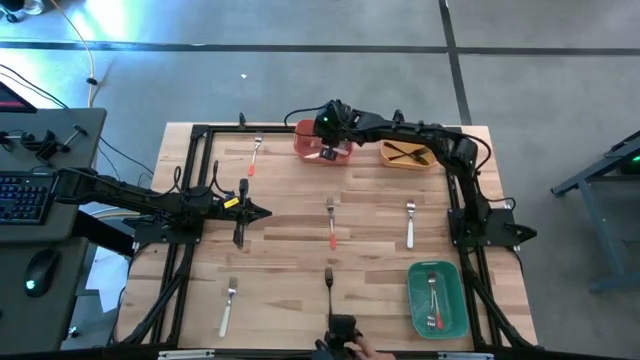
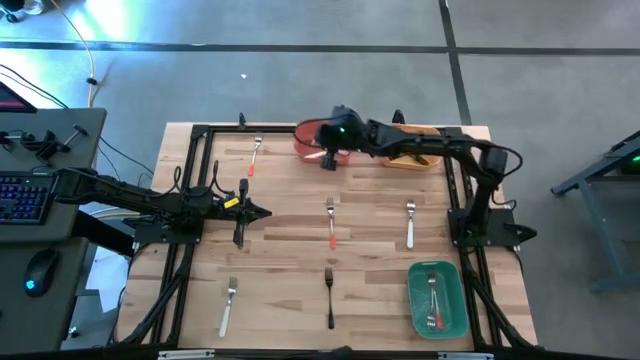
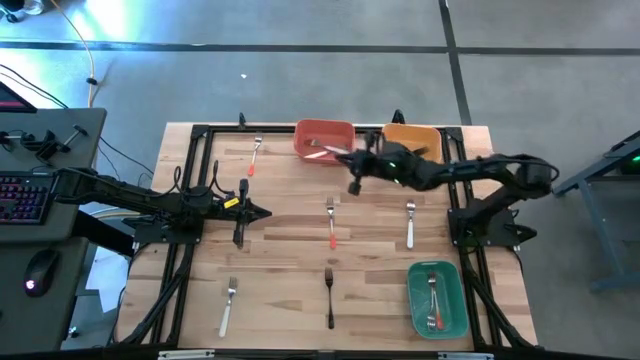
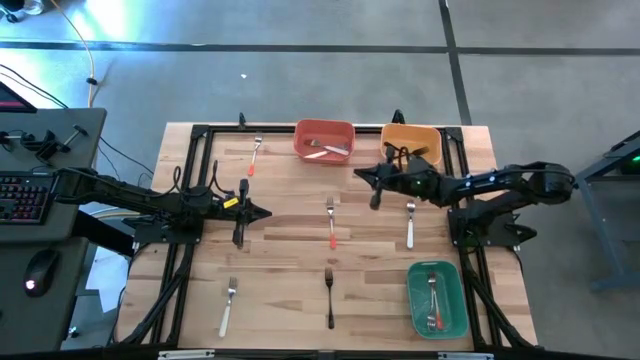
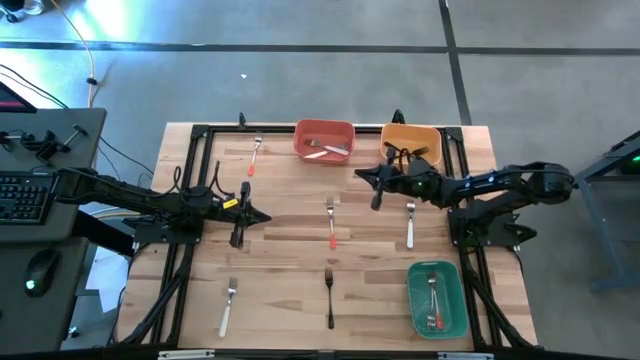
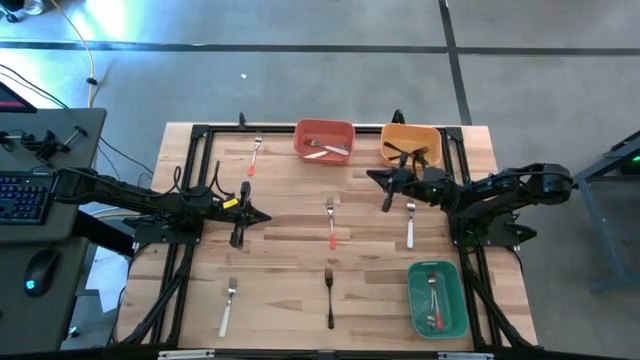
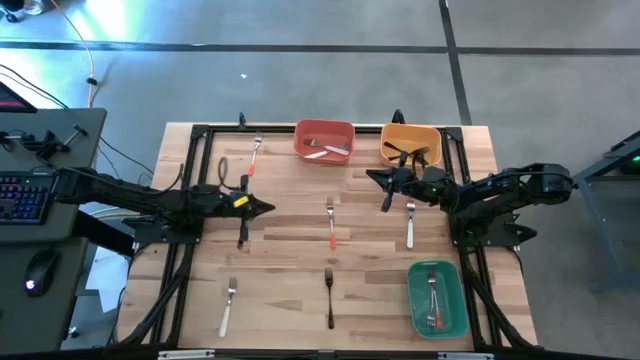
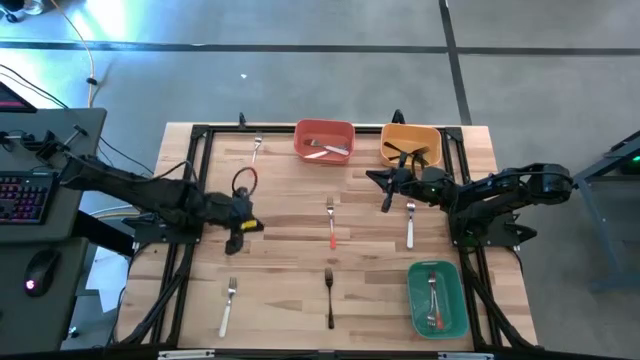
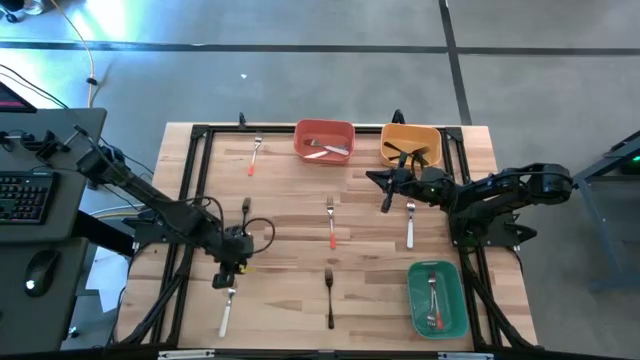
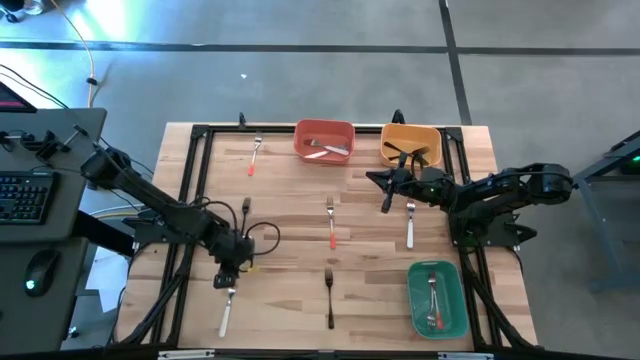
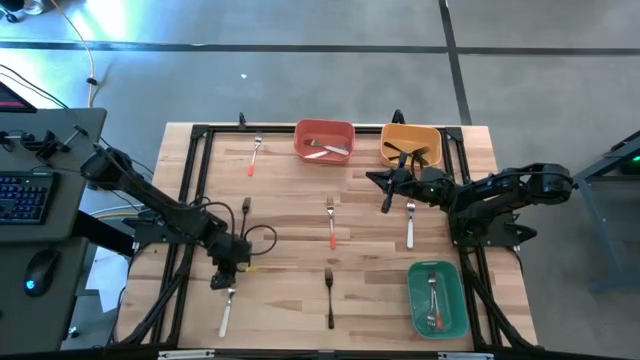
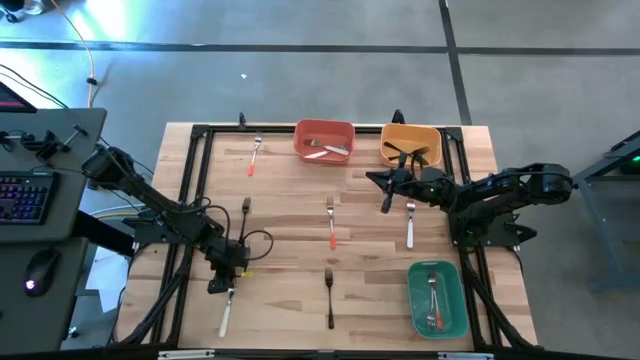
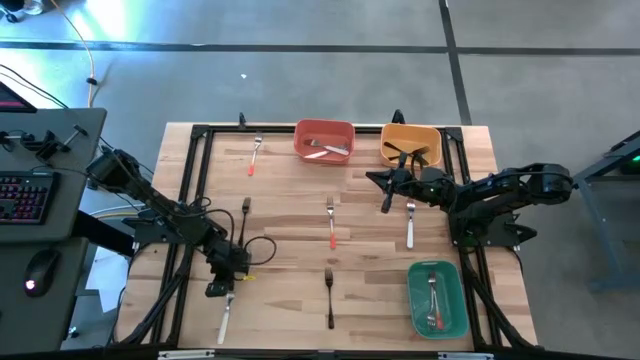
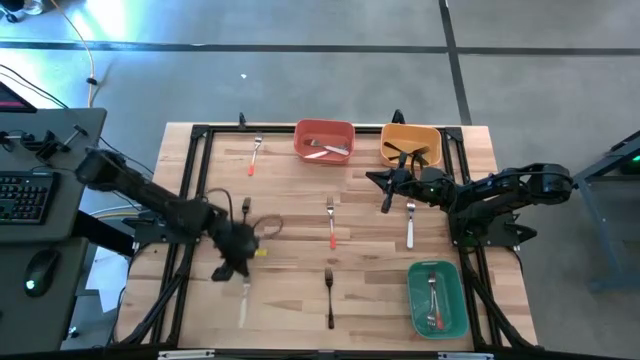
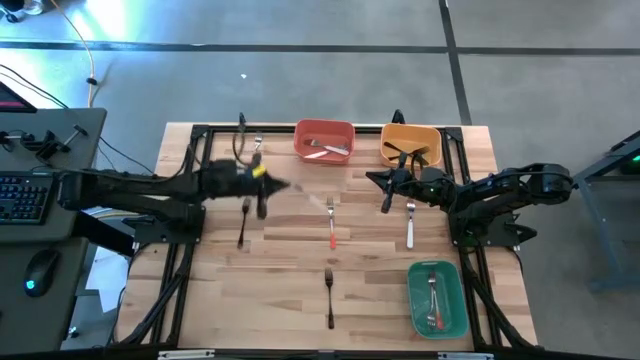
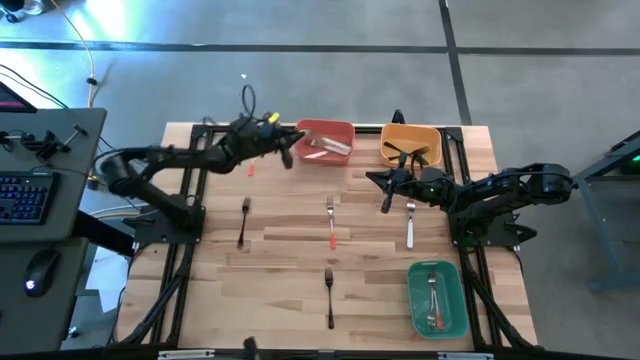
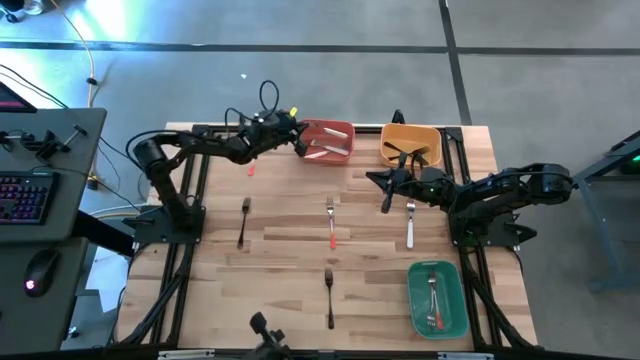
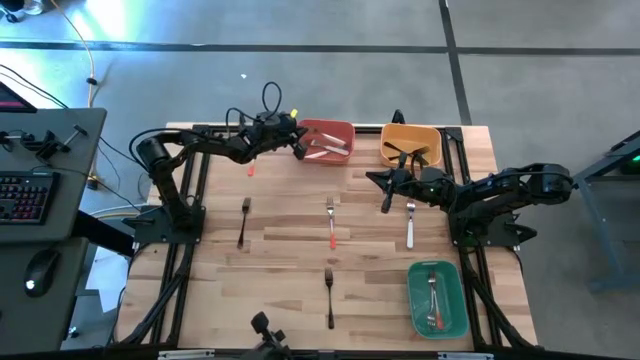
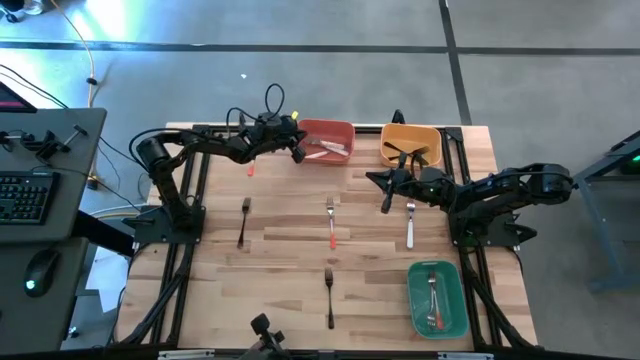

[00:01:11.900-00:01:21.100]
Task: Sort silverware by color (type)
Put the white fork into the orange bin

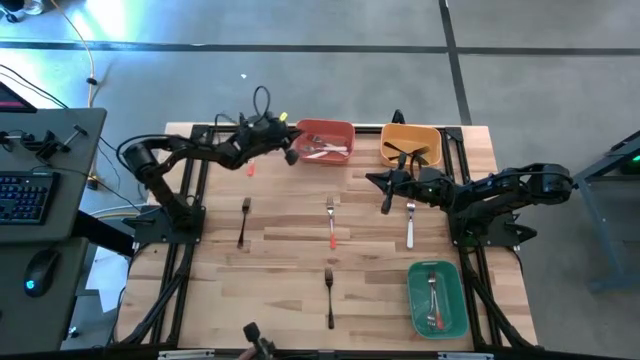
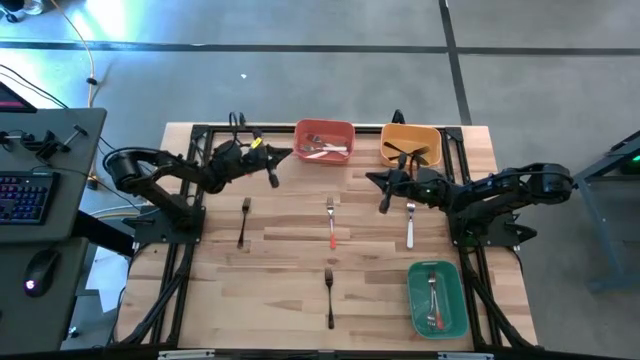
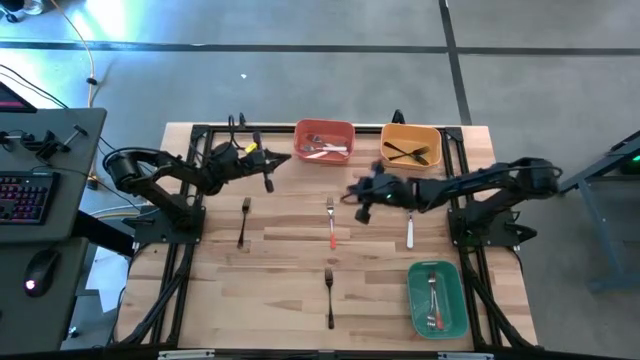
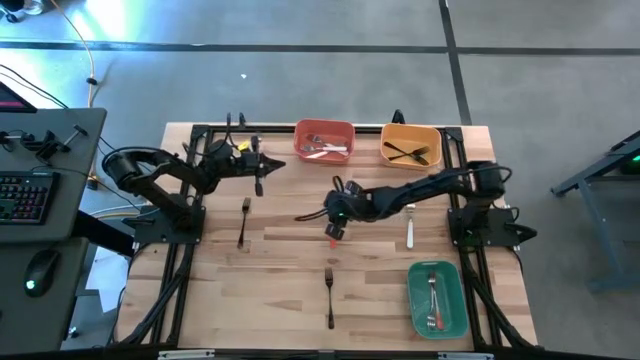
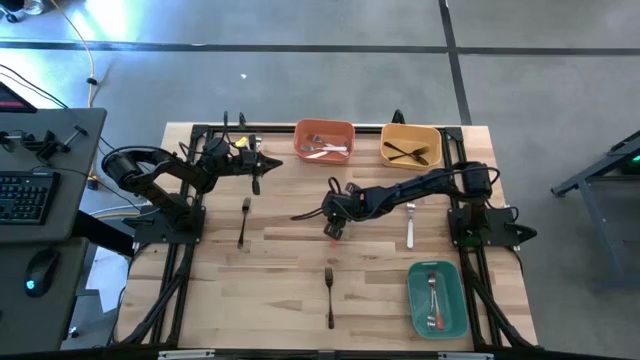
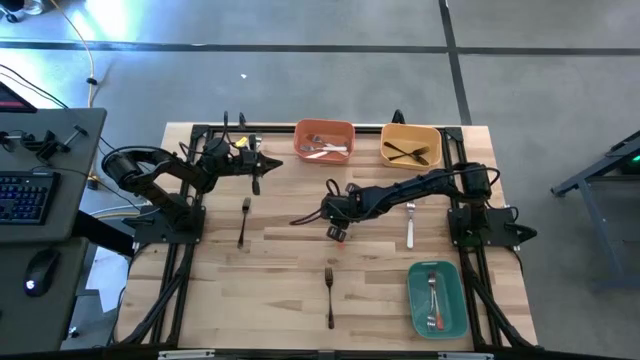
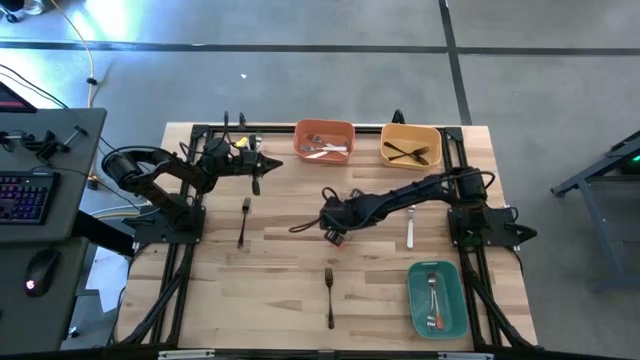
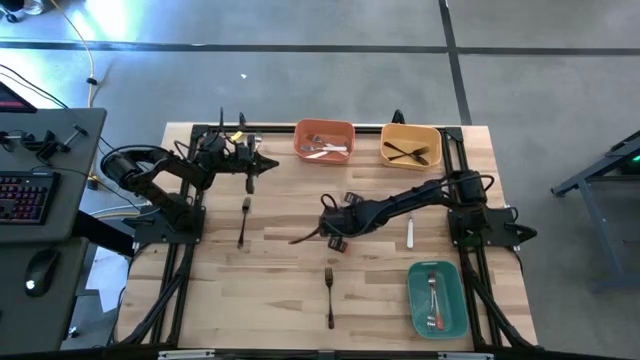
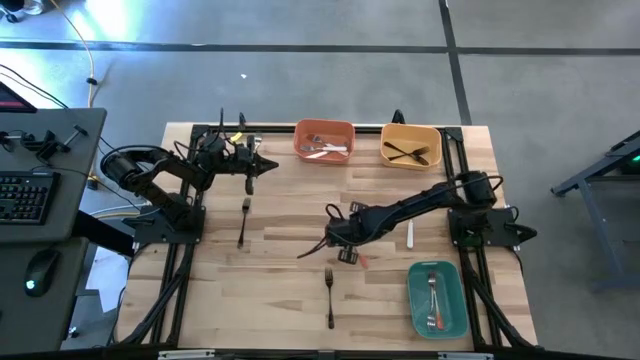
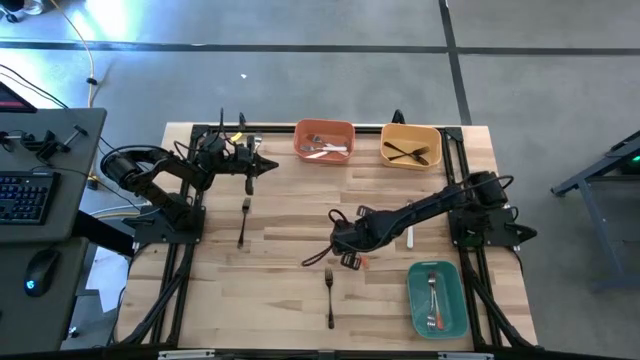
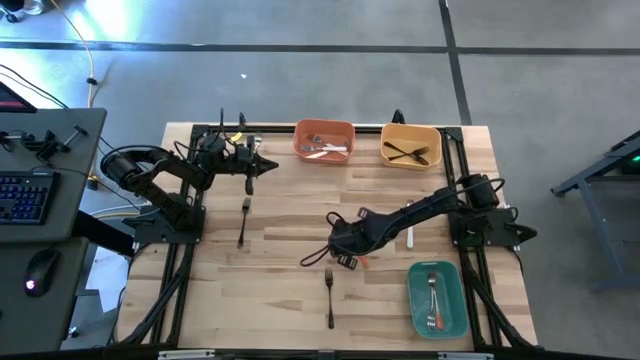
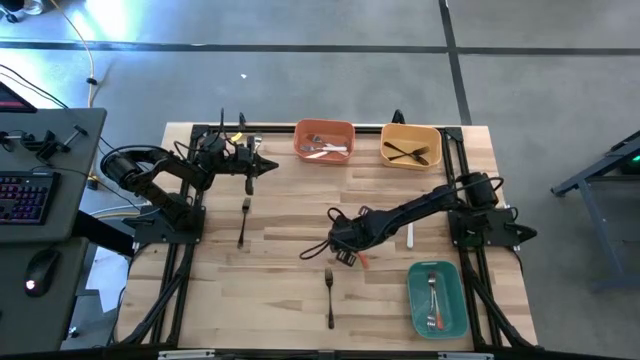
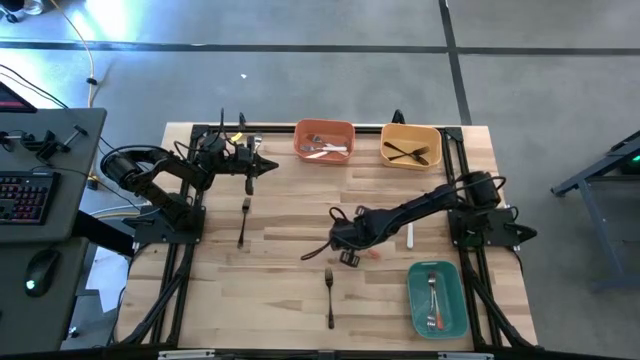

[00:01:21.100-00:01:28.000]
Put the orange fork into the green bin

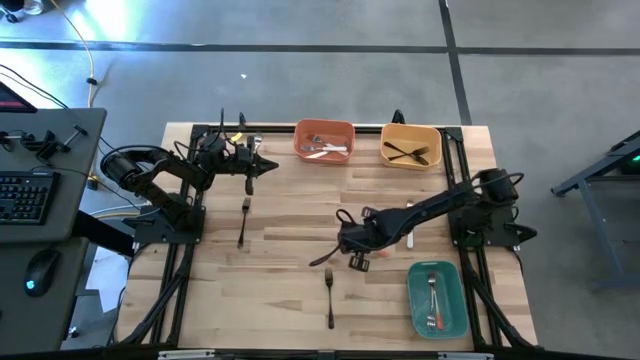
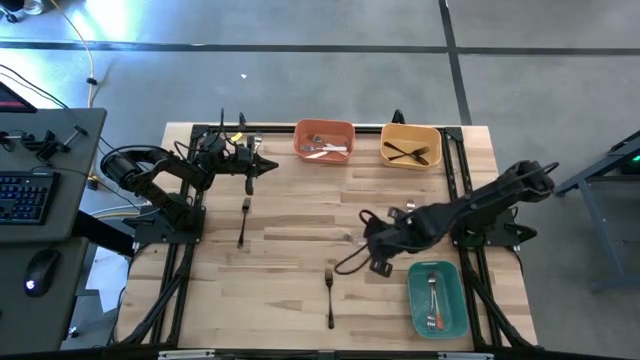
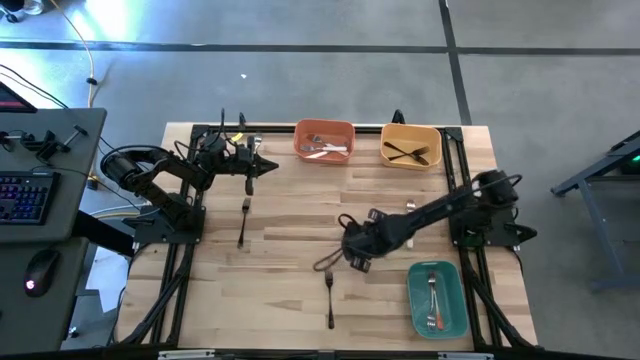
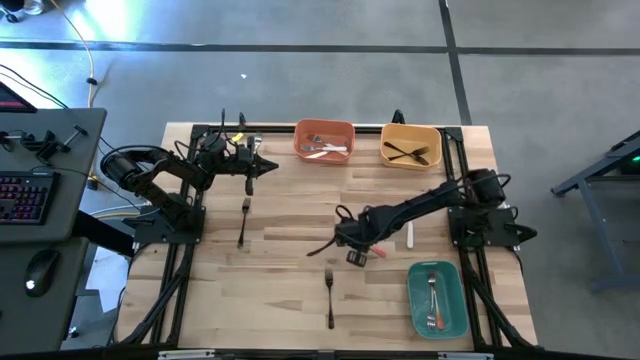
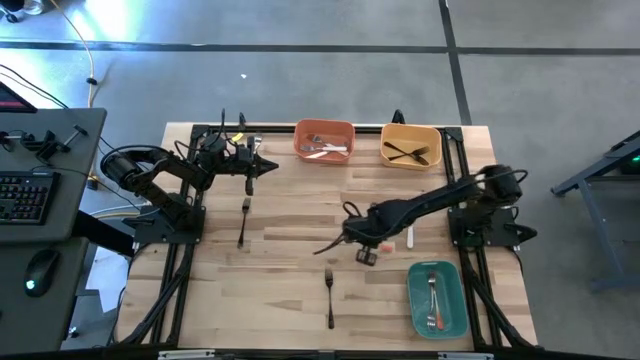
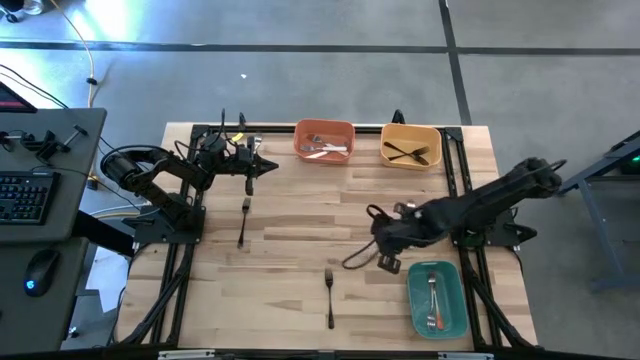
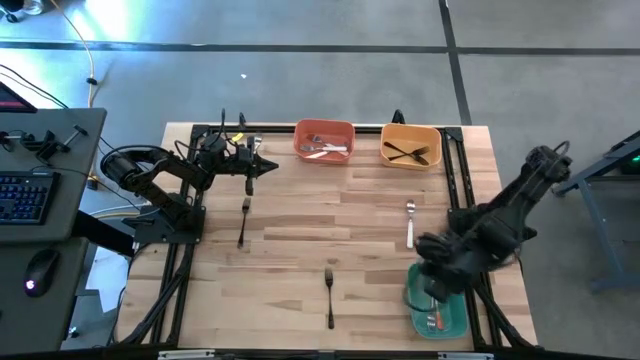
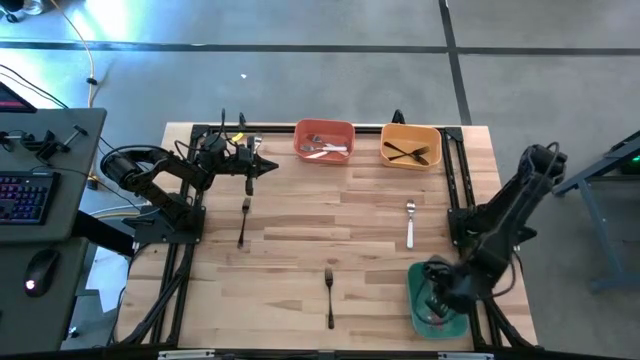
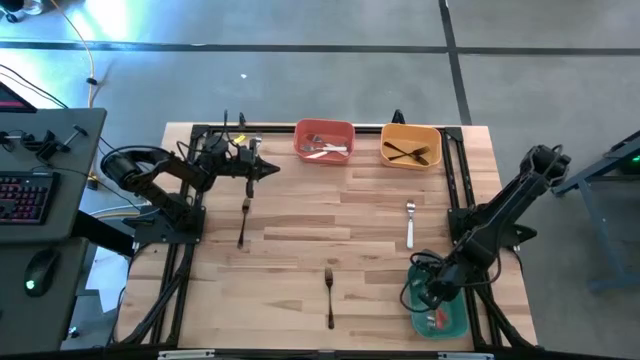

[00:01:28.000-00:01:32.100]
Put the orange fork into the green bin
